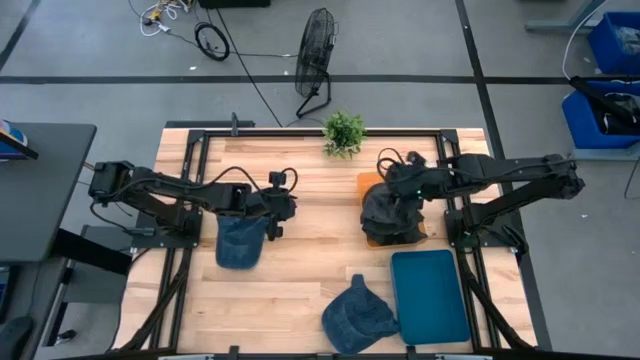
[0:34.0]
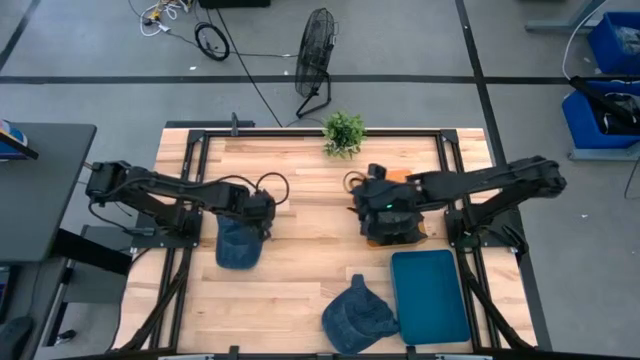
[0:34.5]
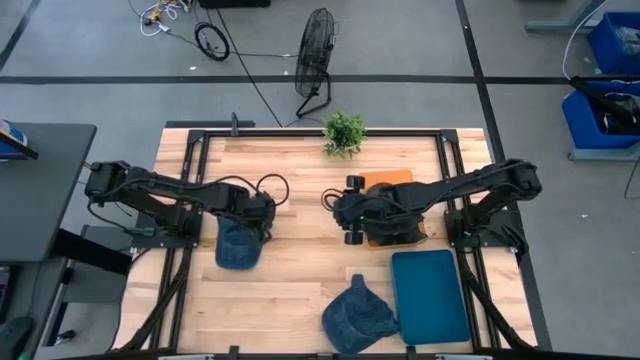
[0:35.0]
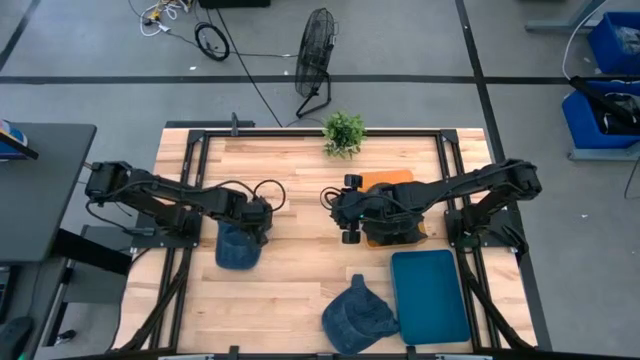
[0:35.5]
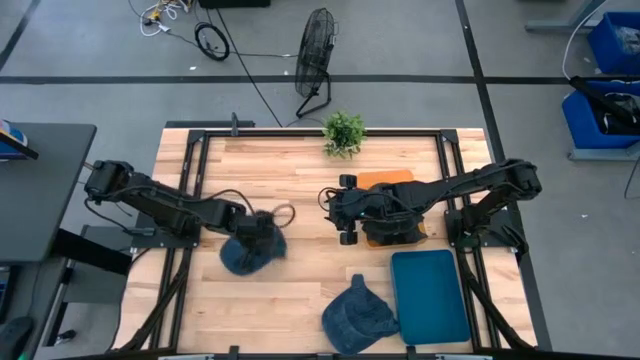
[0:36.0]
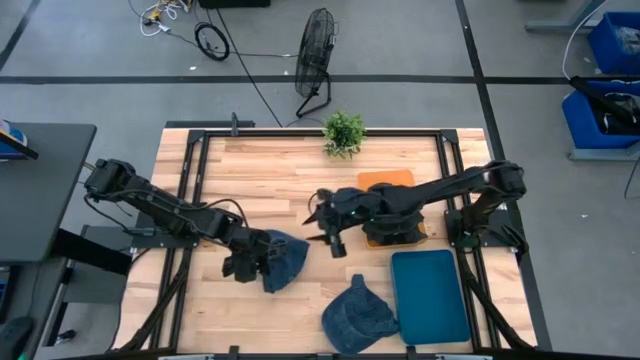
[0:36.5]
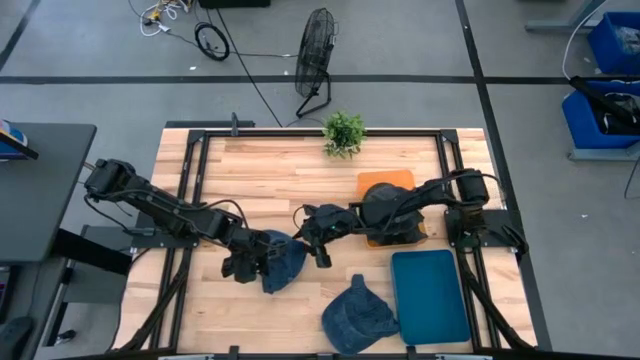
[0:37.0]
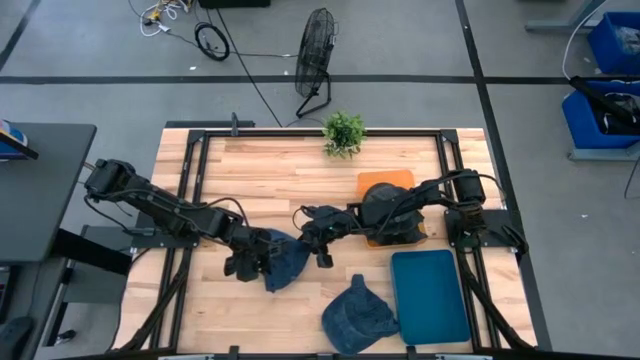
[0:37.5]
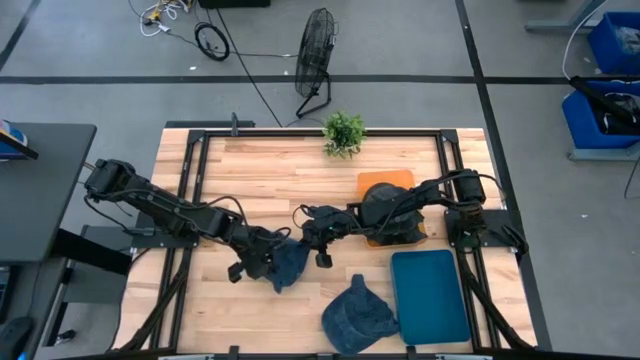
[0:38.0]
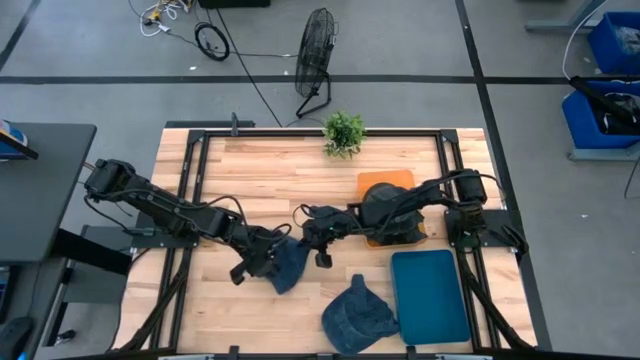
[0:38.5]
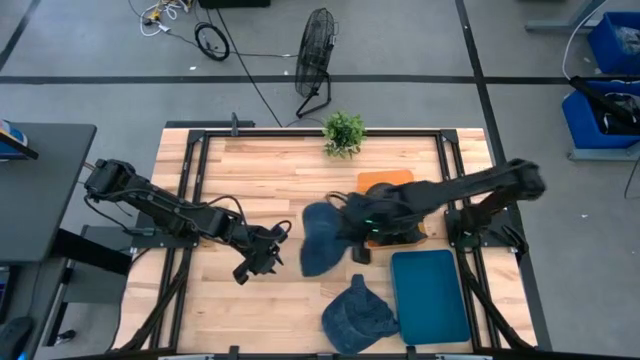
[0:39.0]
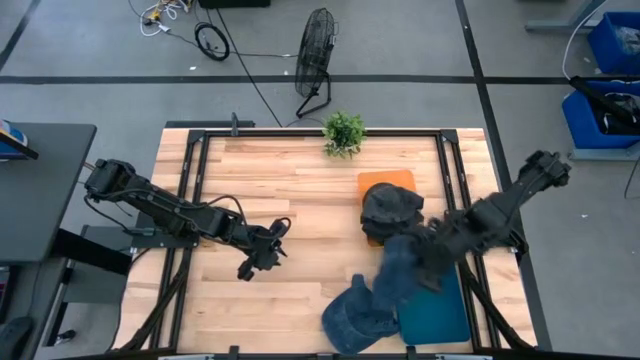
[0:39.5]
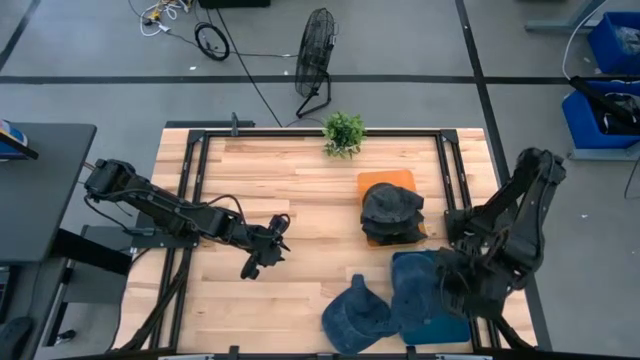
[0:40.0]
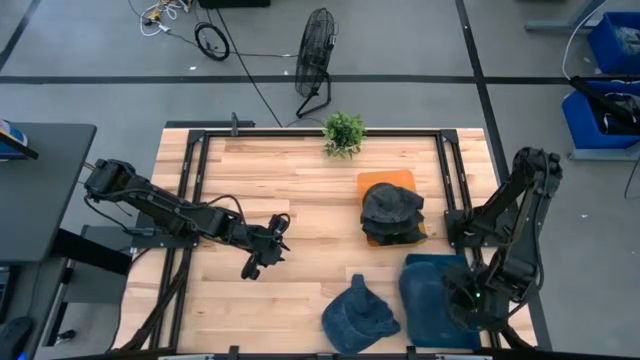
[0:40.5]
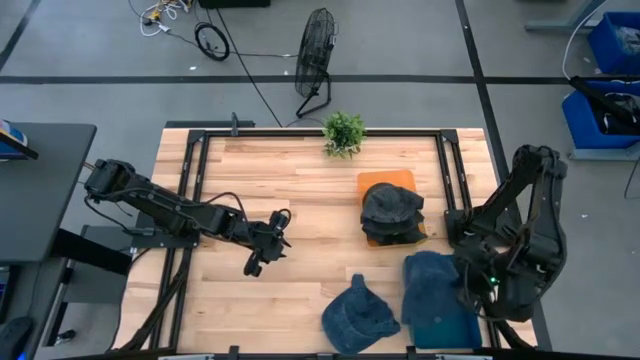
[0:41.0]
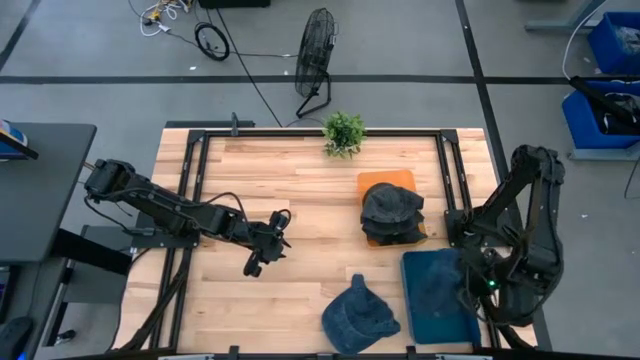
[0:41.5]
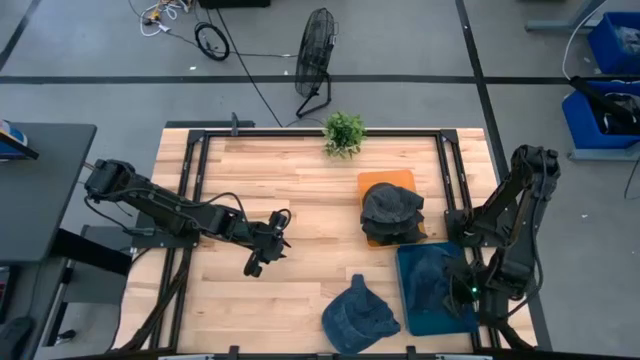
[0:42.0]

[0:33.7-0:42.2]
Task: Pick & Place hat
Put the top blue cap into the blue bin

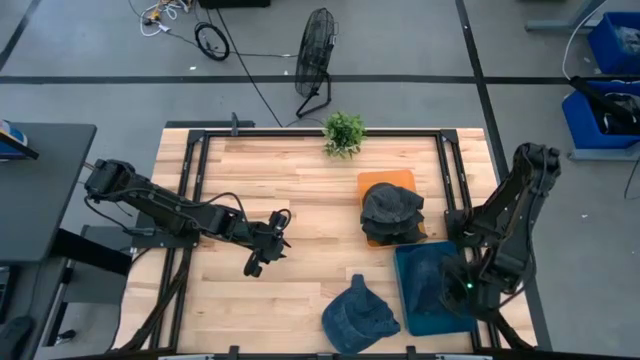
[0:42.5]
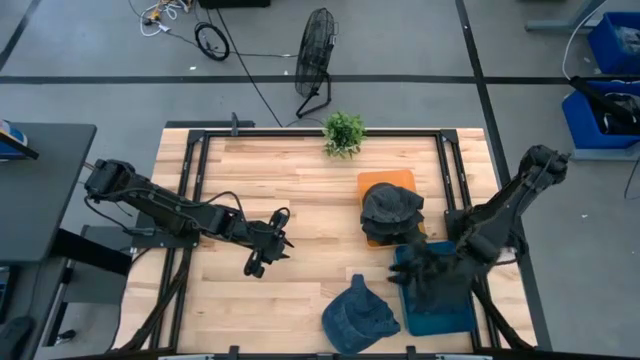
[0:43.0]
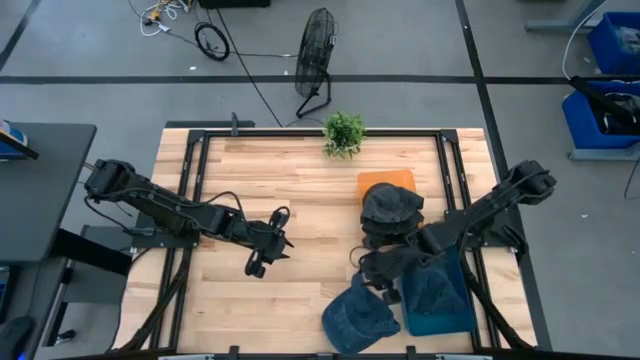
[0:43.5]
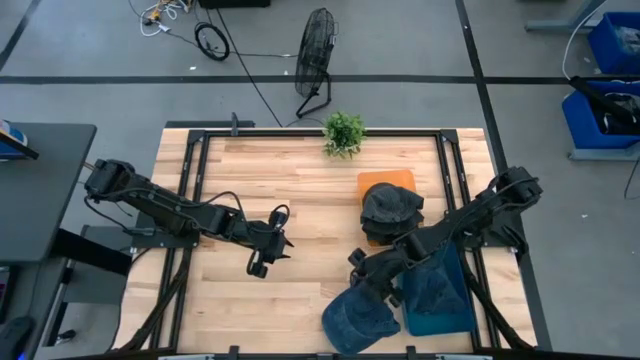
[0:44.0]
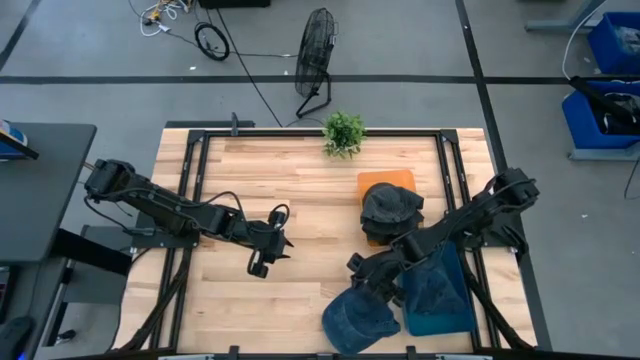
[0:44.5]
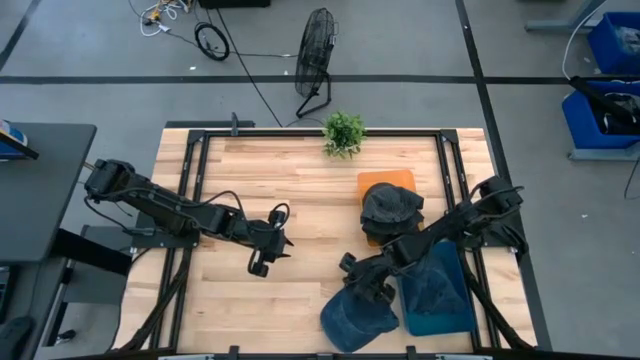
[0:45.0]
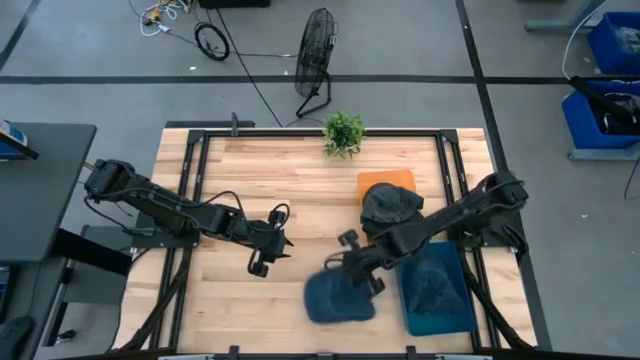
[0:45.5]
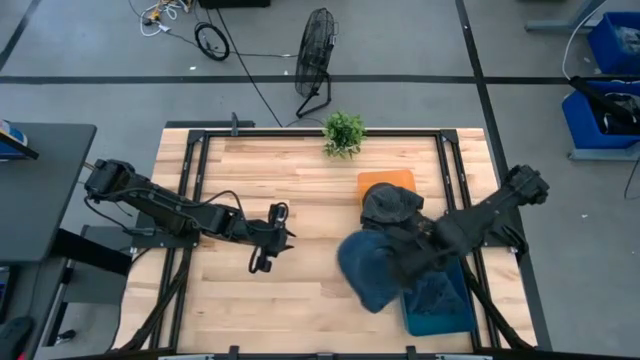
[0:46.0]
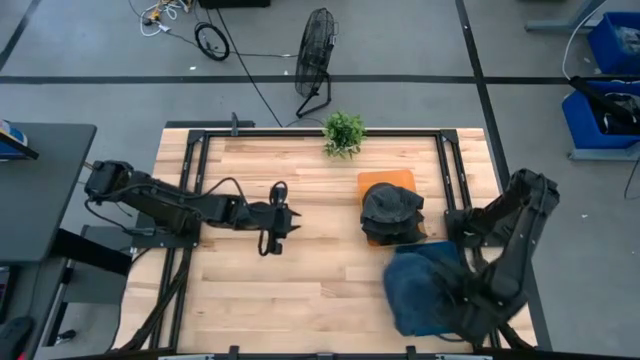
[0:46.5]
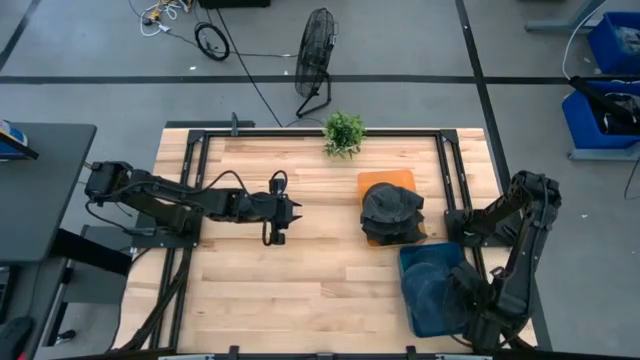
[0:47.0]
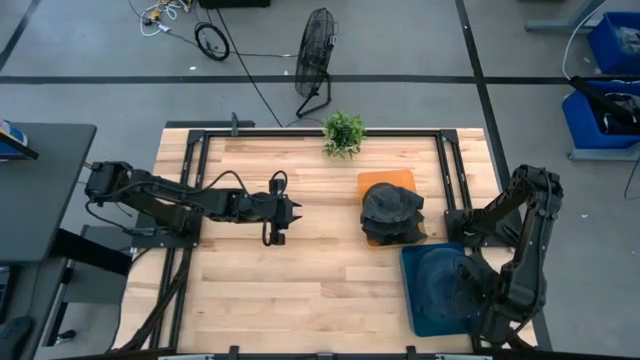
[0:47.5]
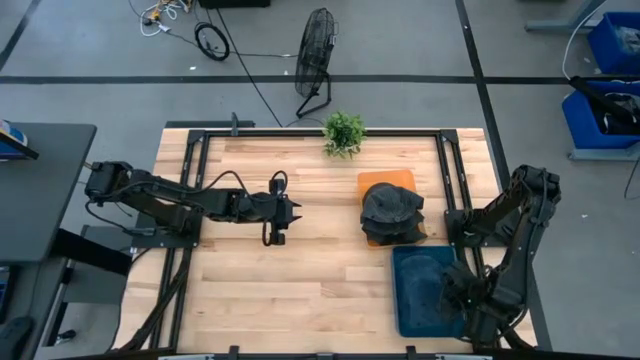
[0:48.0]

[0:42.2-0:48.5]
Put the blue cap into the blue bin

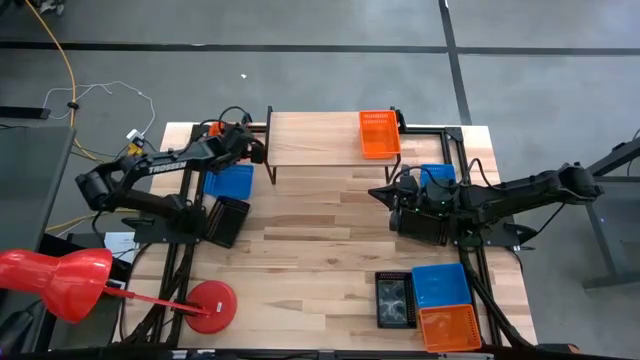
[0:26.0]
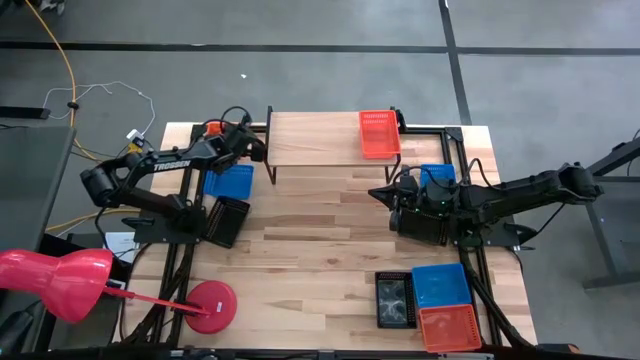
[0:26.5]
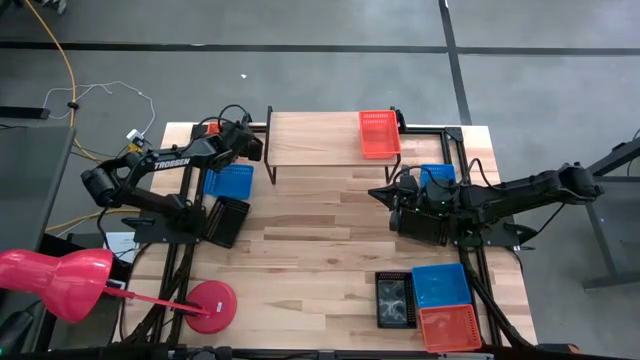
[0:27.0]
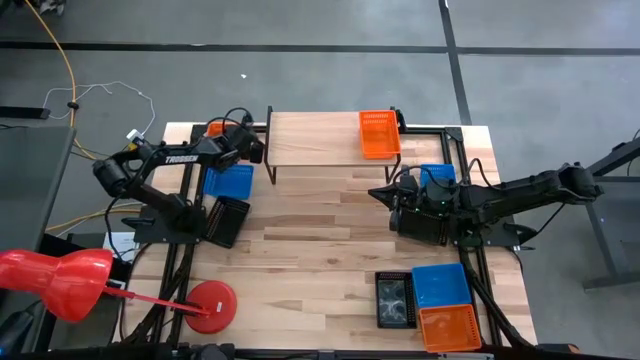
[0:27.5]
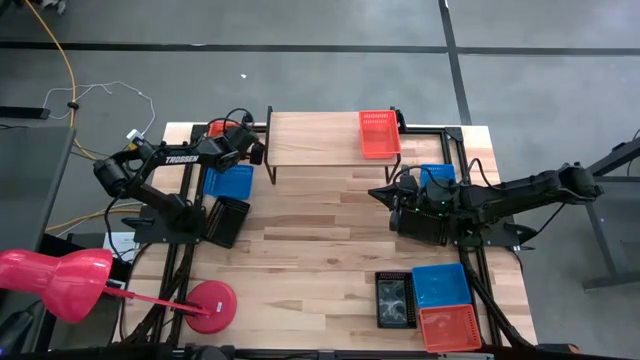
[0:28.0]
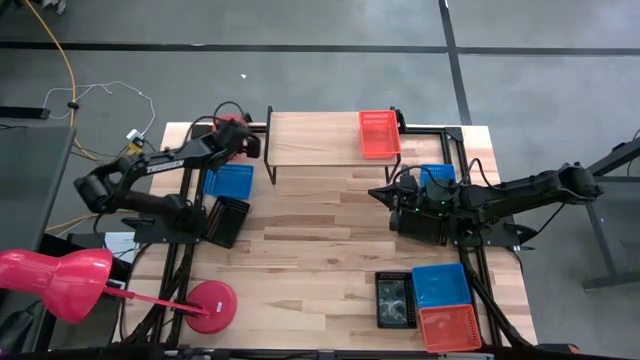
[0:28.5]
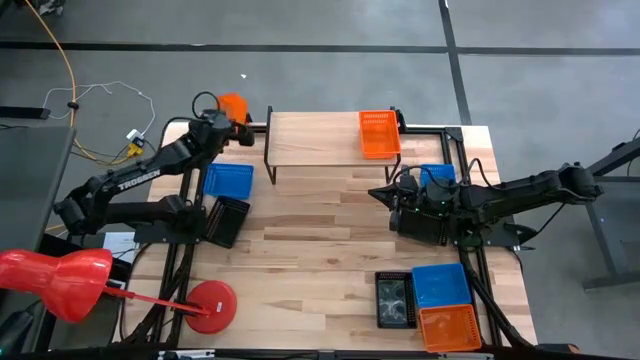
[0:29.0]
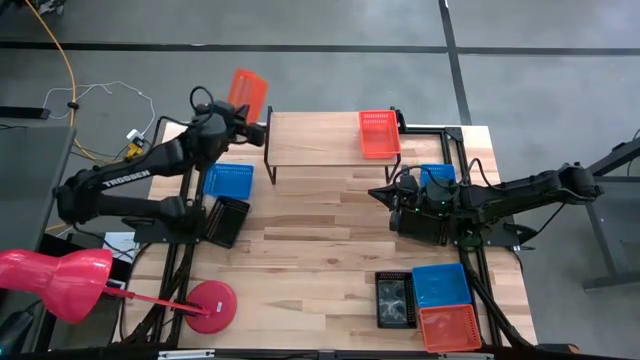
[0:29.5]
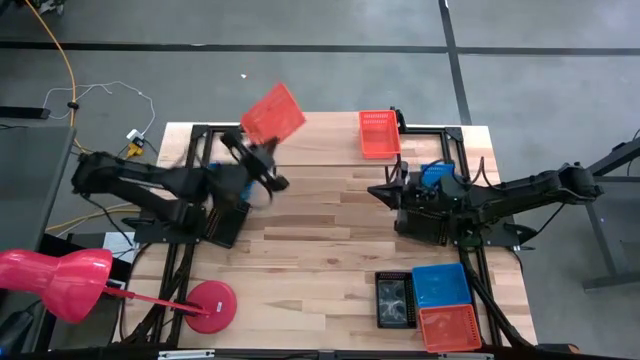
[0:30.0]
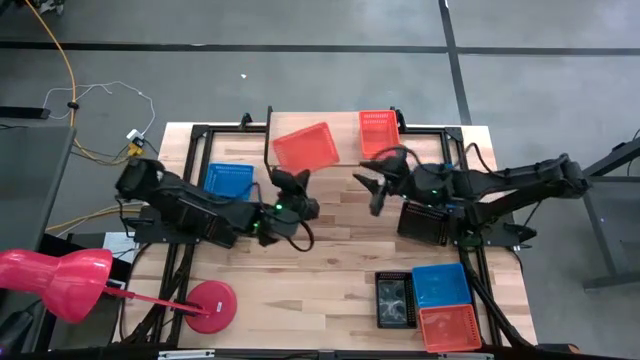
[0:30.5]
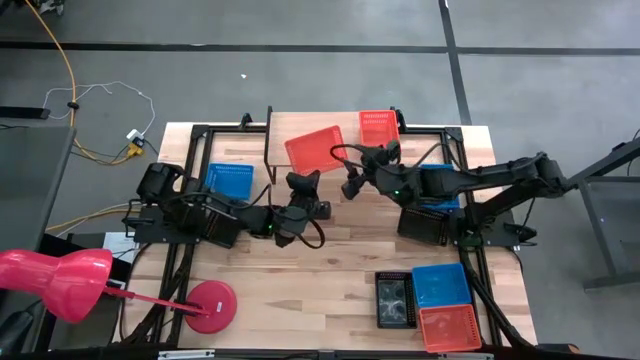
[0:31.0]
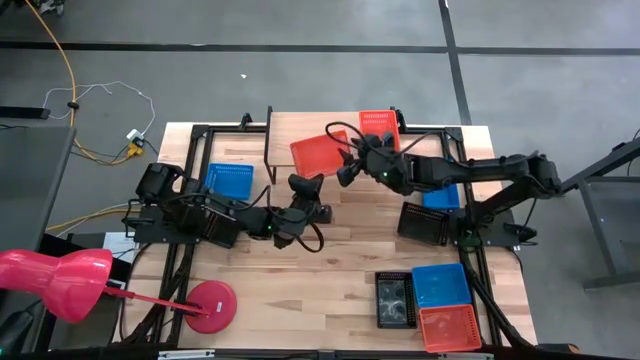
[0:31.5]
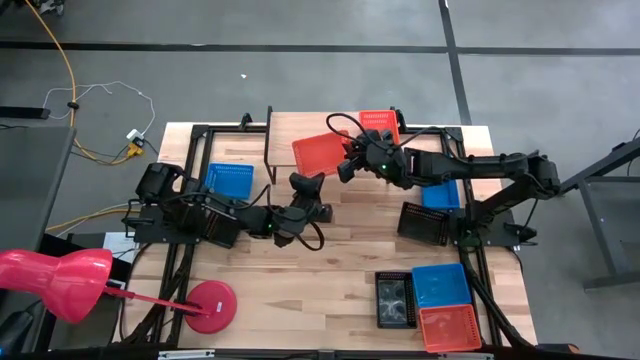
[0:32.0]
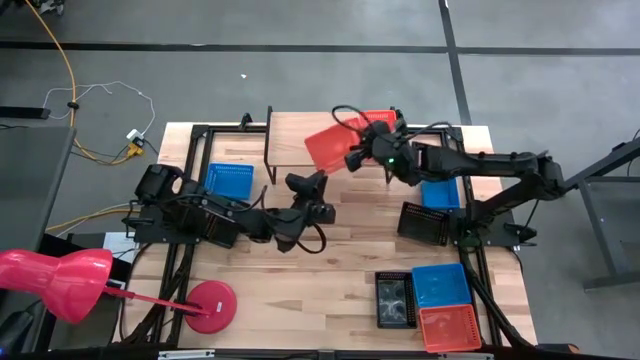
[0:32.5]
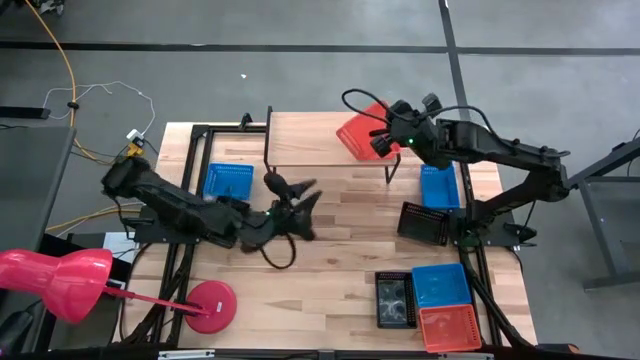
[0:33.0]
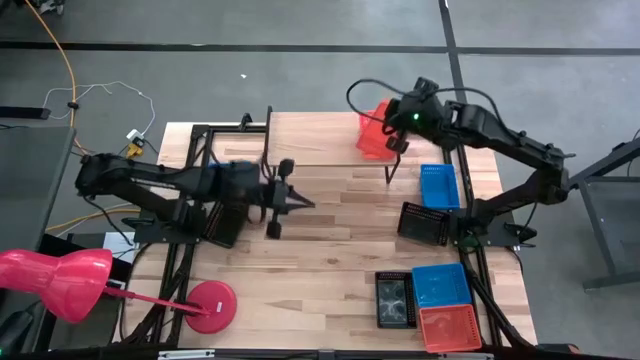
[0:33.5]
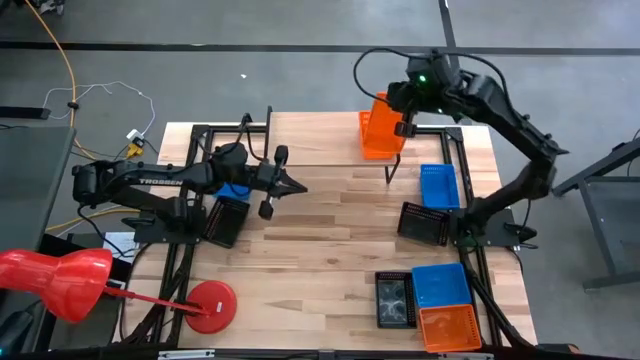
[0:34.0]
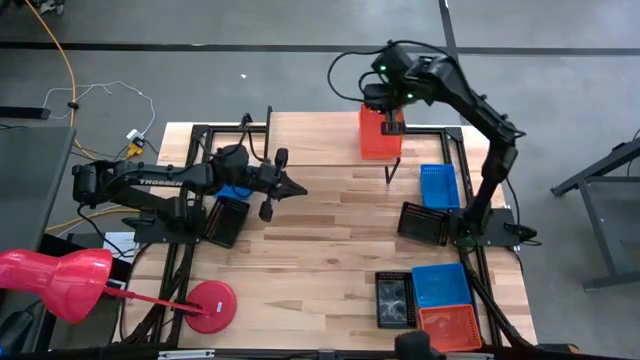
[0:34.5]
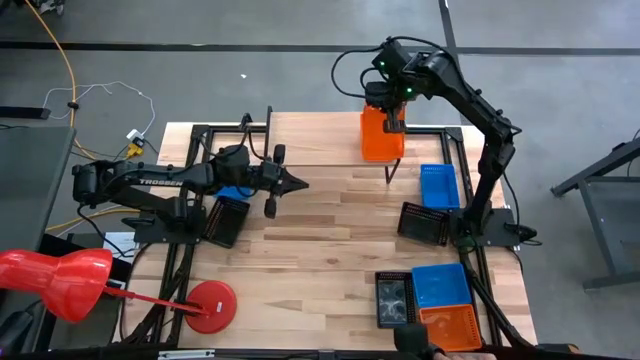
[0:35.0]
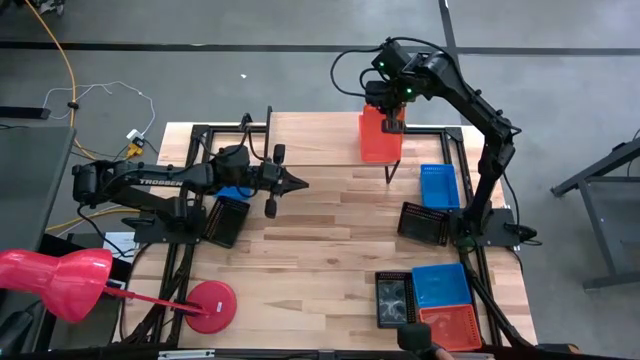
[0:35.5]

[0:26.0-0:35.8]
Task: Stack baskets on shelf by color
Stack the top left orange basket on the other orange basket on the shelf
